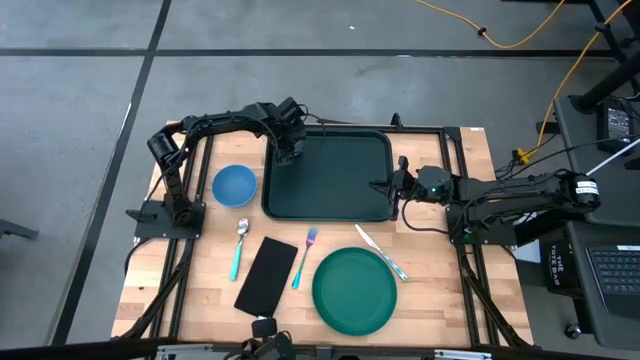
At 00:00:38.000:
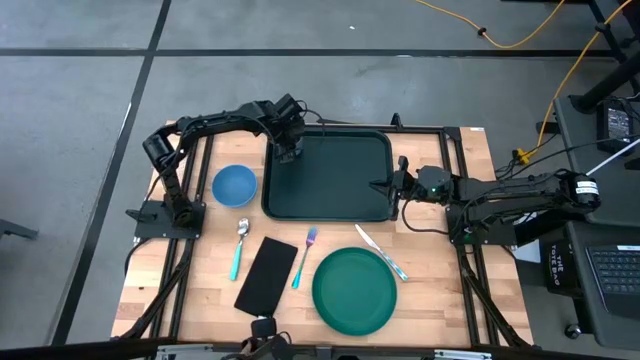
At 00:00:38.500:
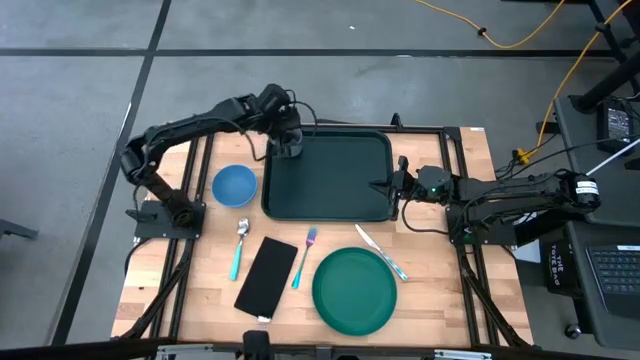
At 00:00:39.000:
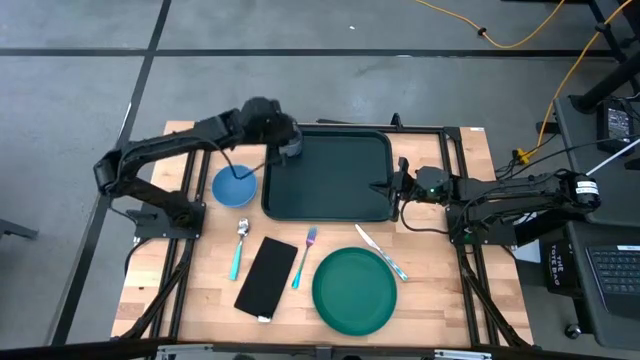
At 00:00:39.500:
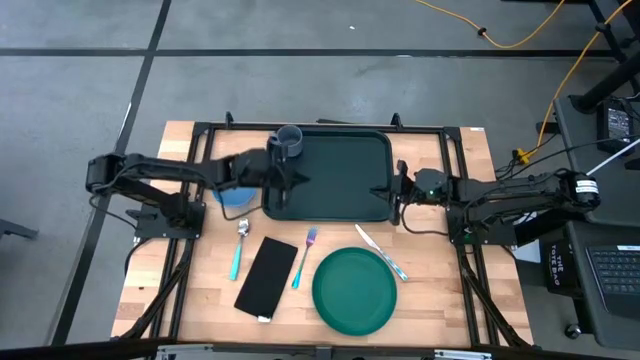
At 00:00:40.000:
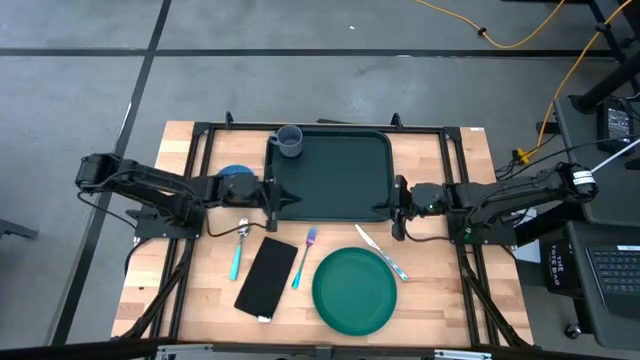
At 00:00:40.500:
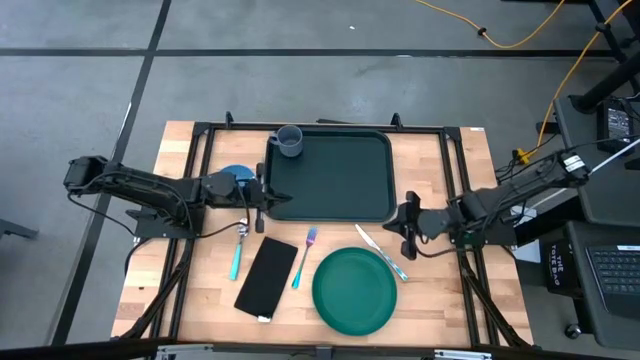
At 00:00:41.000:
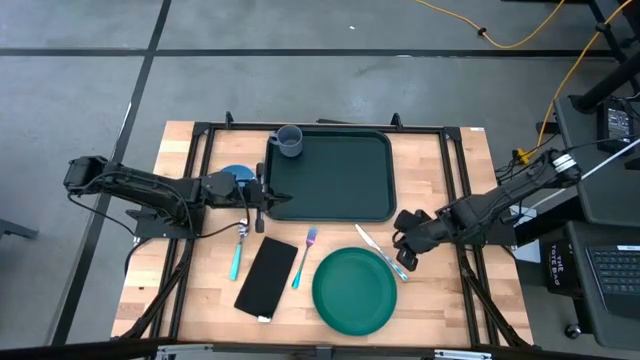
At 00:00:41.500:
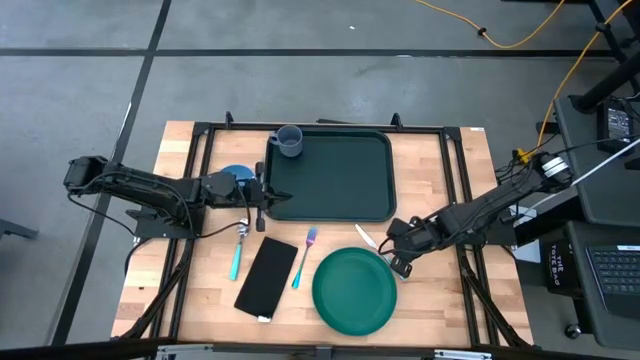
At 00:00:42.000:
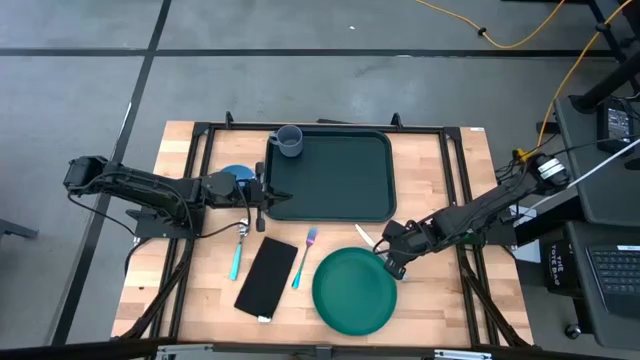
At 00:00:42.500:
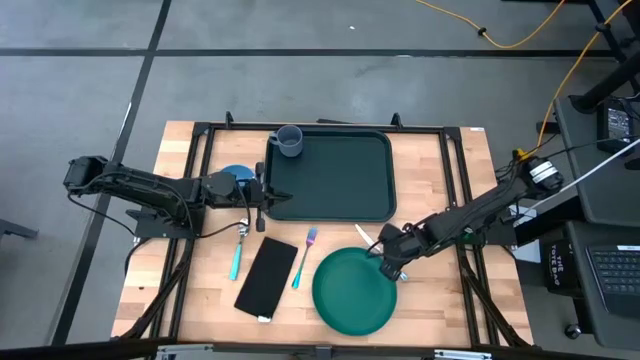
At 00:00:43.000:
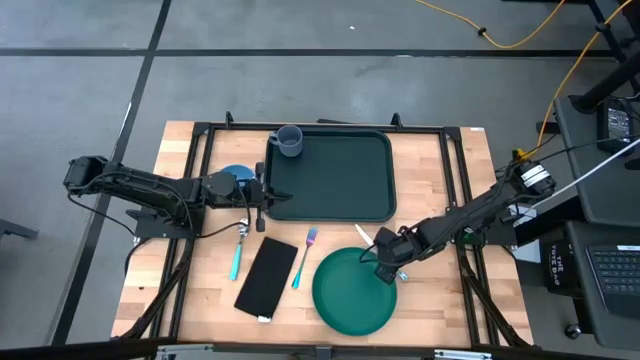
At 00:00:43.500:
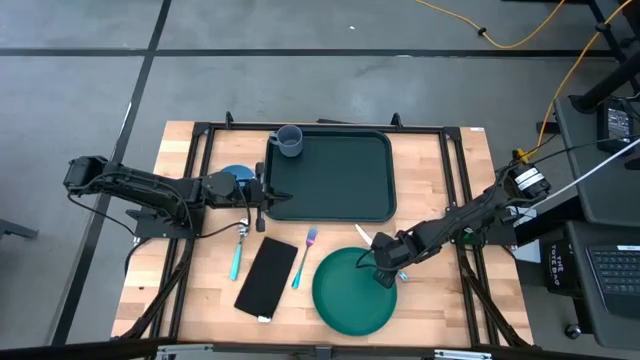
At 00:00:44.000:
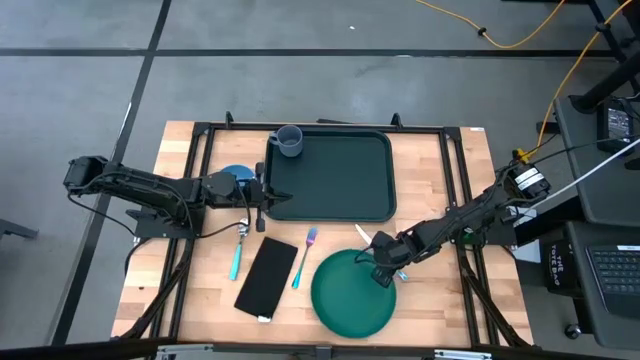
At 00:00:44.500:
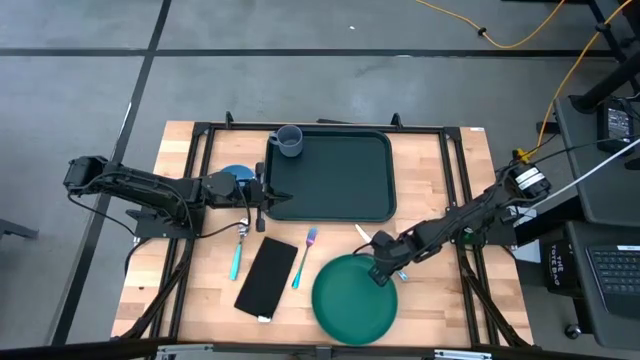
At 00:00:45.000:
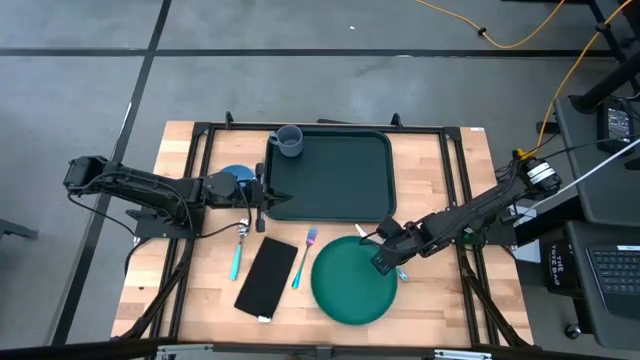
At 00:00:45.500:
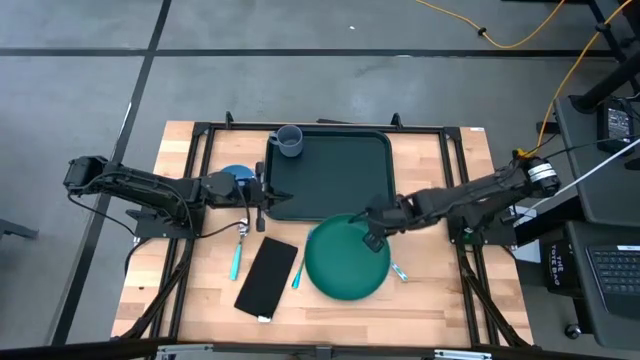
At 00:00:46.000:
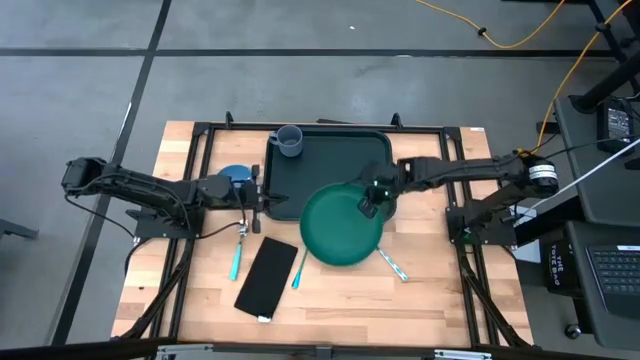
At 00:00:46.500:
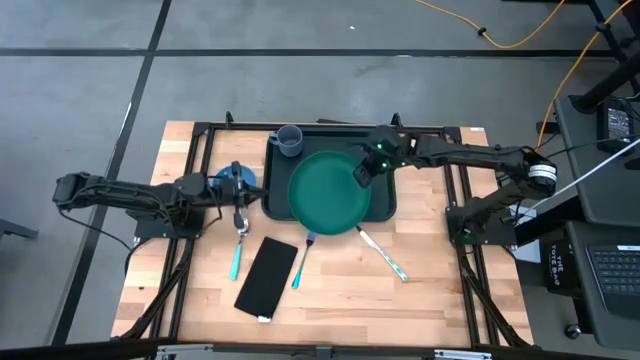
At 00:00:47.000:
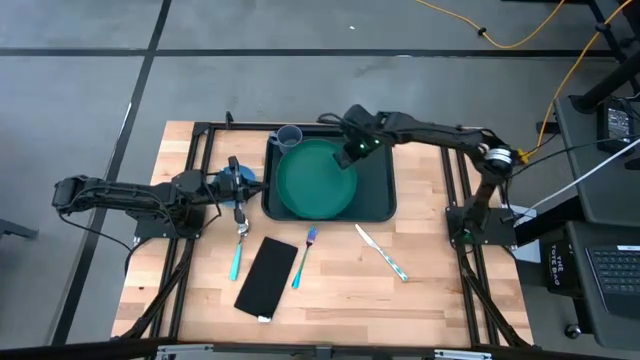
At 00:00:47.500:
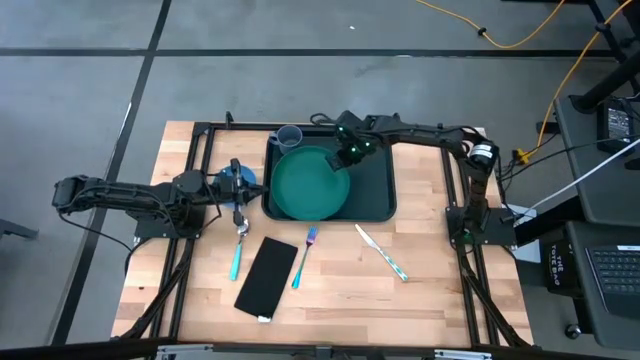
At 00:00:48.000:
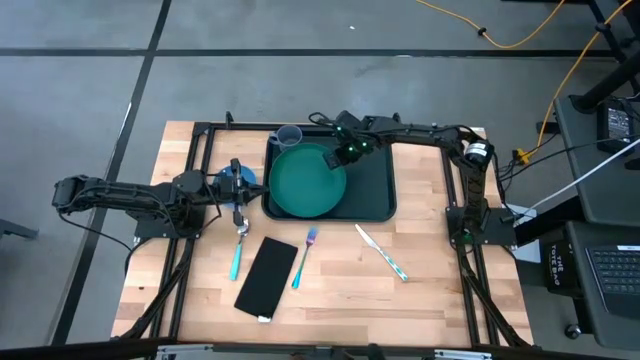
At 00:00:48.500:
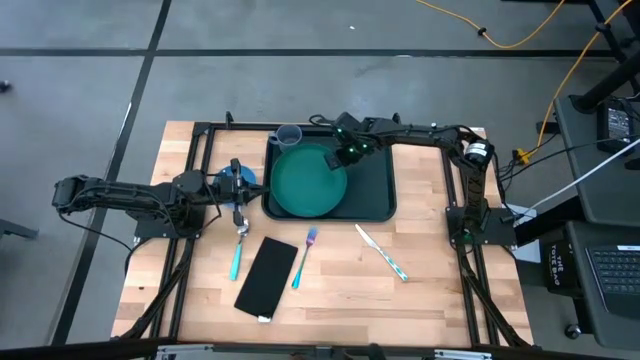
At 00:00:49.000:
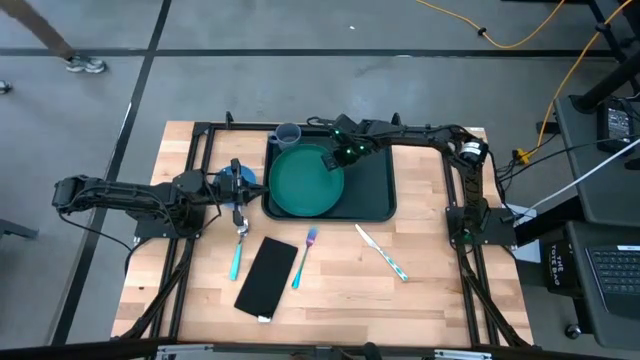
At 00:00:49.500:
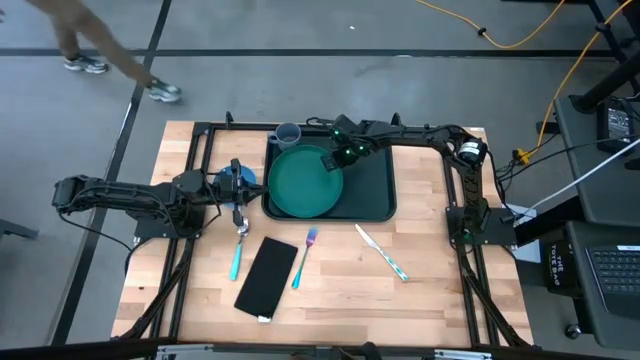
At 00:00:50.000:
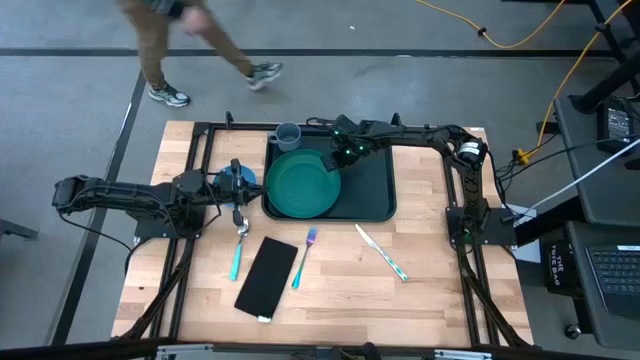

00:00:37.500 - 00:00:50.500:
Task: Set up tray
Put the green plate on the black serving tray to the bottom of the gray cup

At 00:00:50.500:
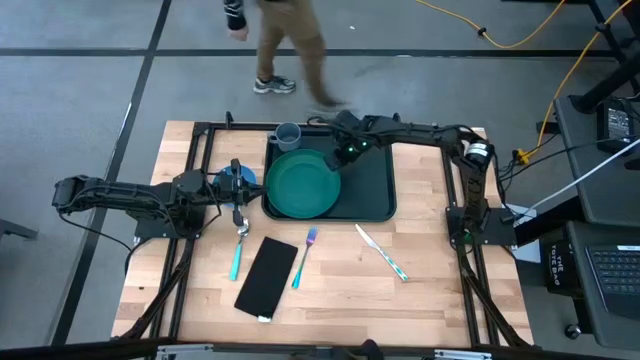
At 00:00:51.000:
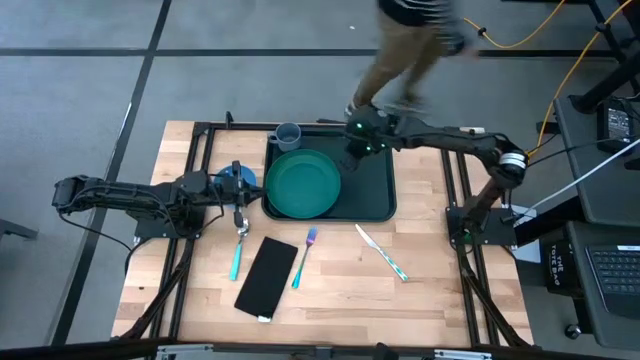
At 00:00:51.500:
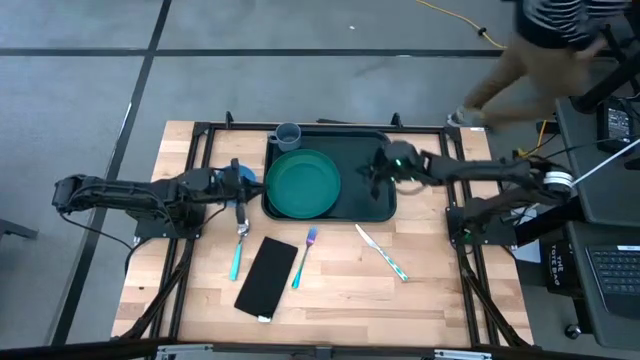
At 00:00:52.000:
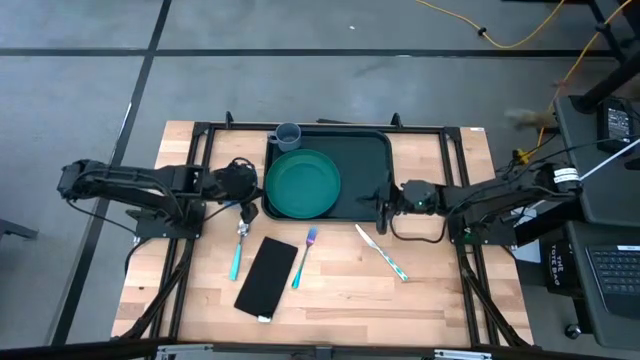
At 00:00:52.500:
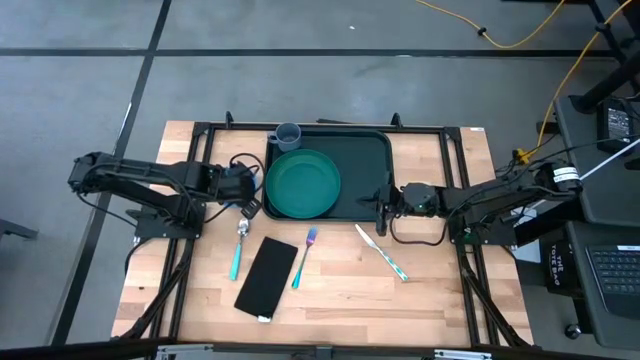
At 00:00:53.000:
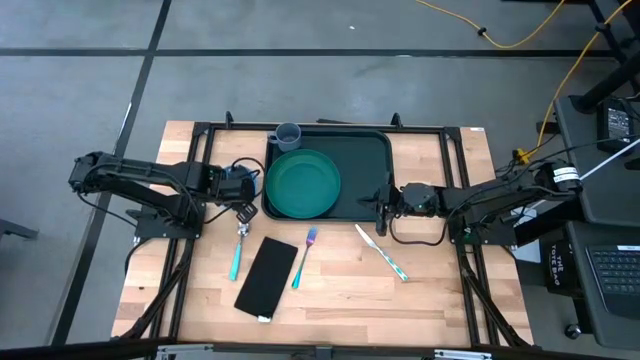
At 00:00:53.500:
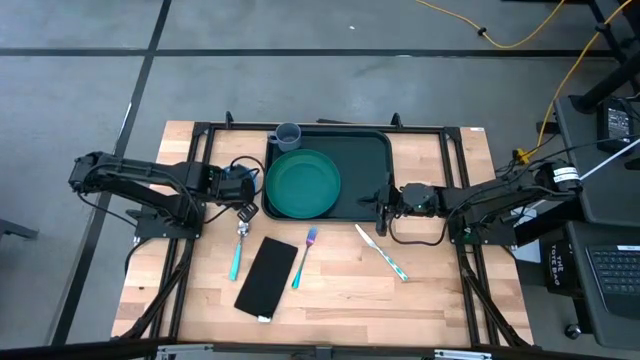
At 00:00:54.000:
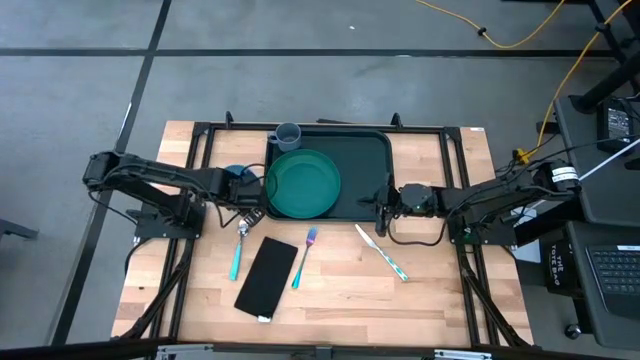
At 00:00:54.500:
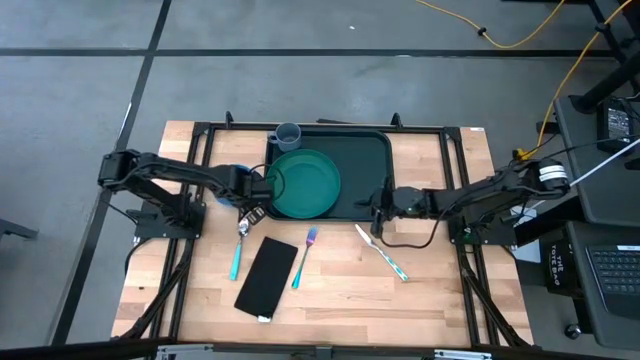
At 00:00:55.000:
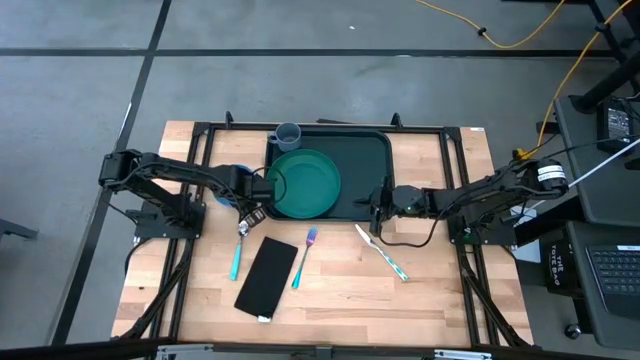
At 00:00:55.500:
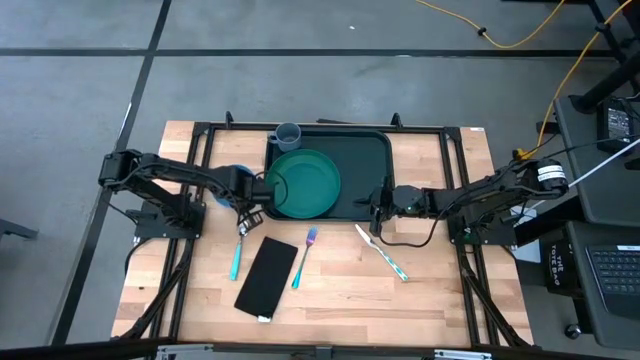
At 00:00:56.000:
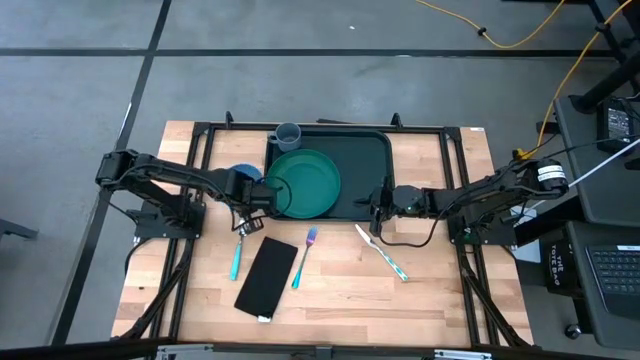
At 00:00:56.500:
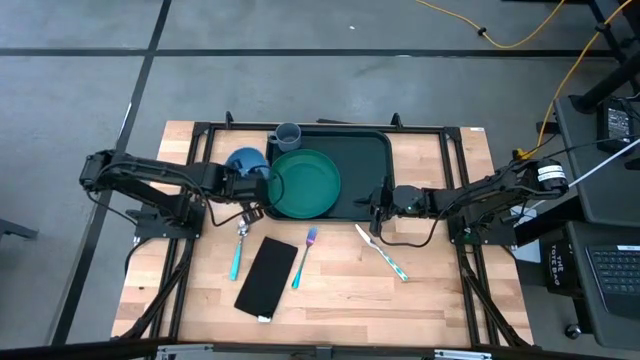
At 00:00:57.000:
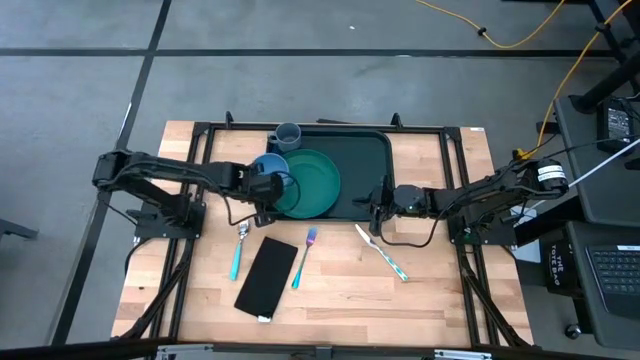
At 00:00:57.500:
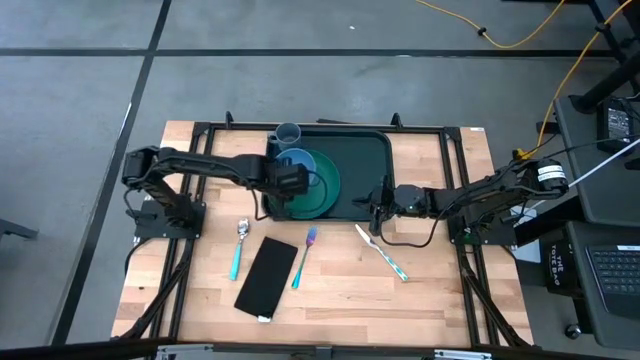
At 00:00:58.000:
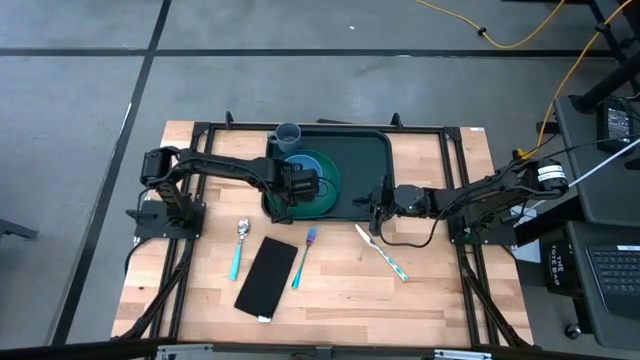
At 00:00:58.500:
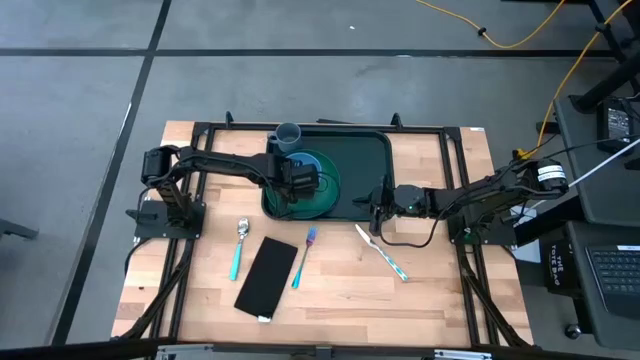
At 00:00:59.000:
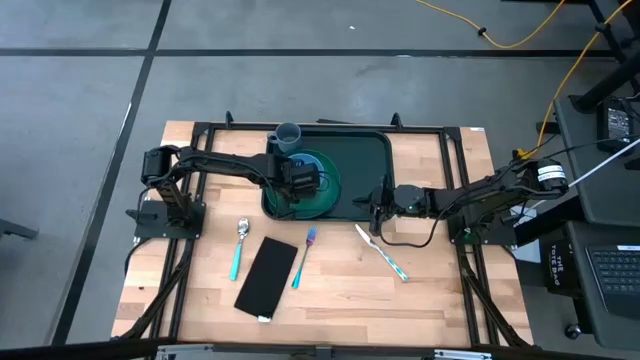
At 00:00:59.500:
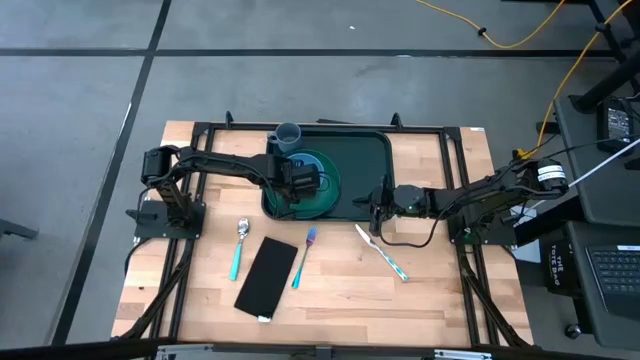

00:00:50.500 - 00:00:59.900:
Put the blue bowl on the green plate
